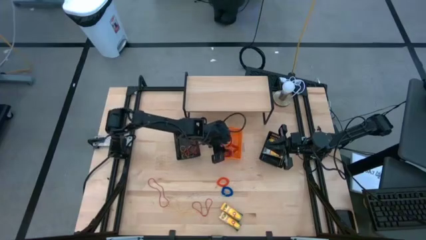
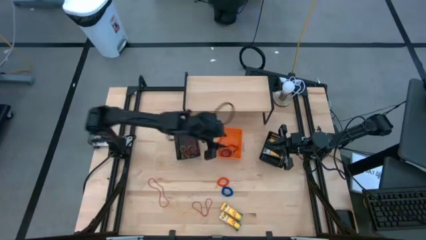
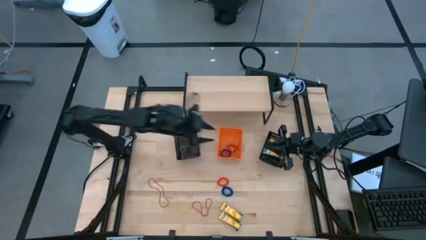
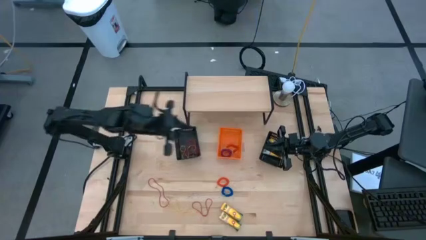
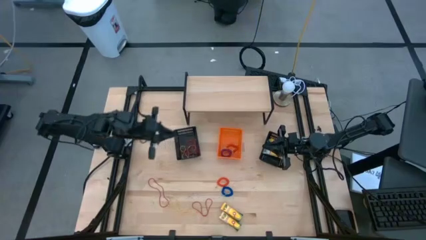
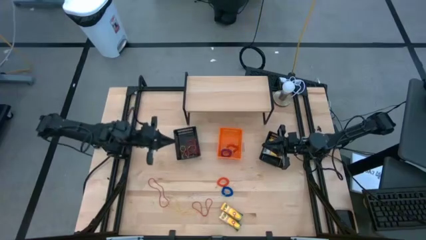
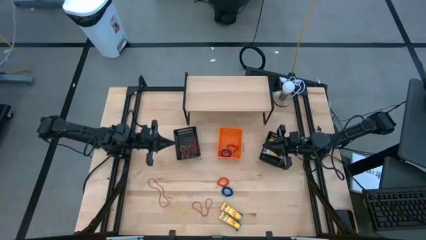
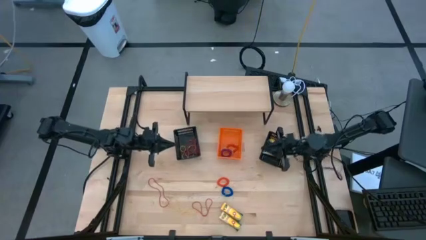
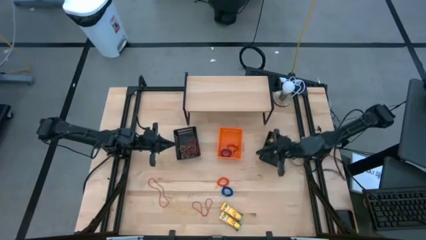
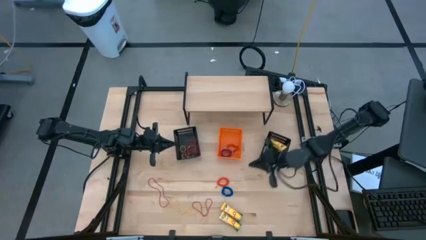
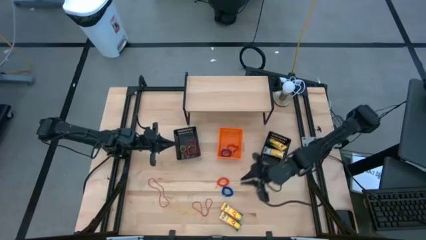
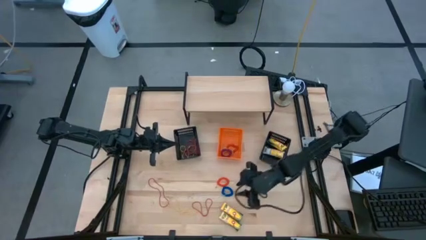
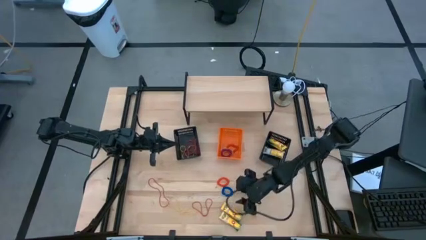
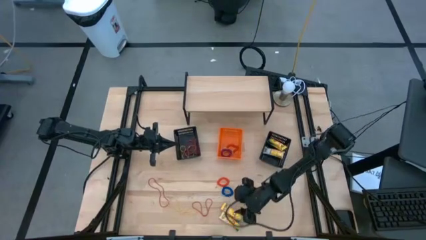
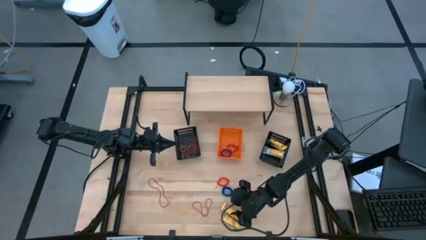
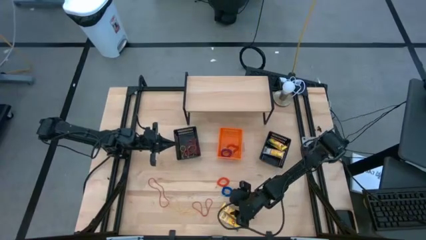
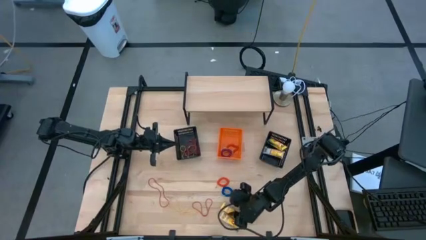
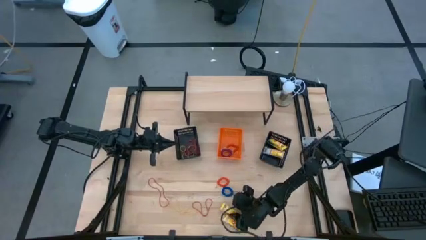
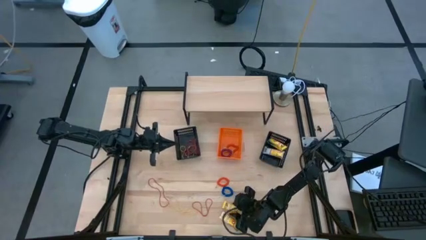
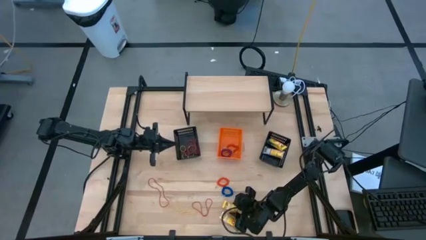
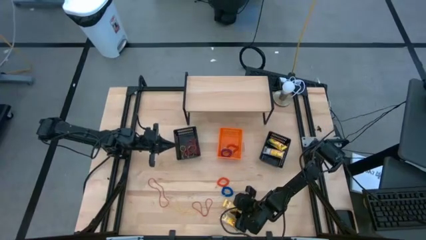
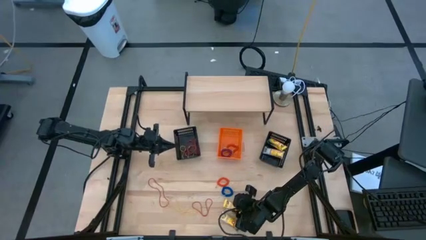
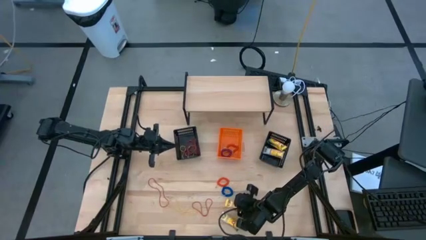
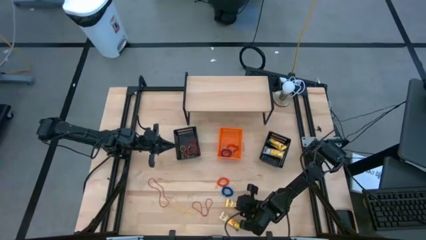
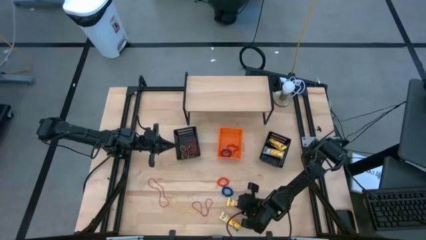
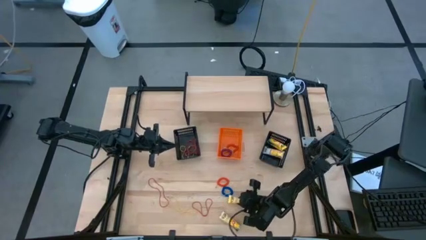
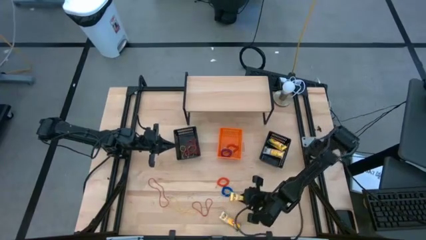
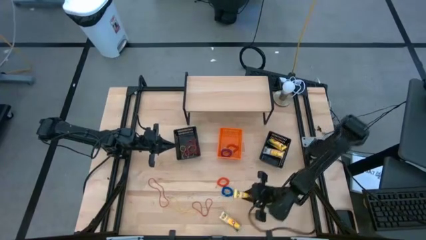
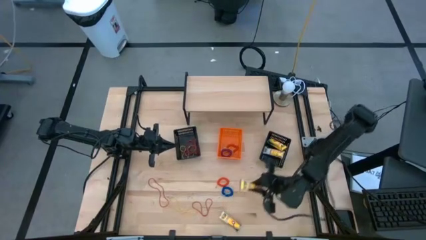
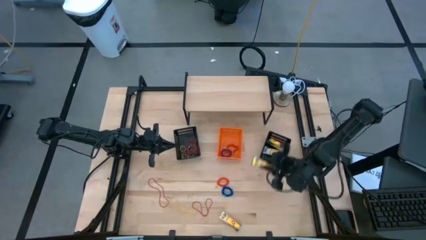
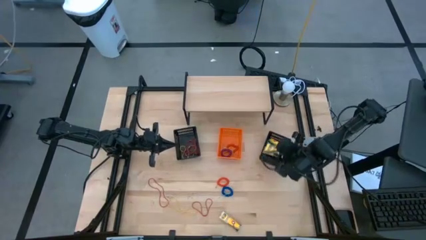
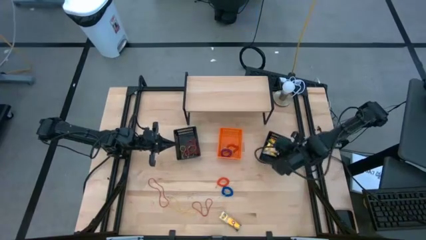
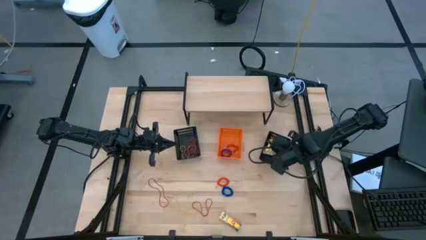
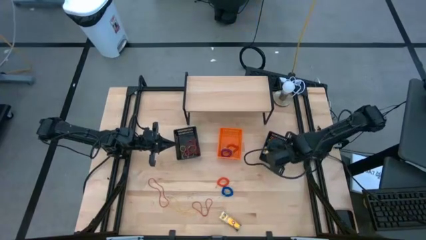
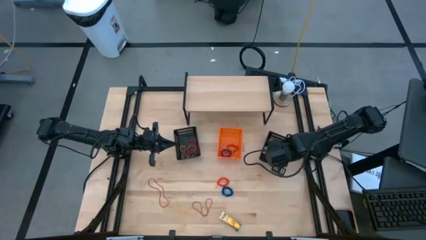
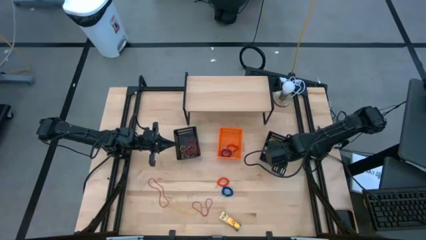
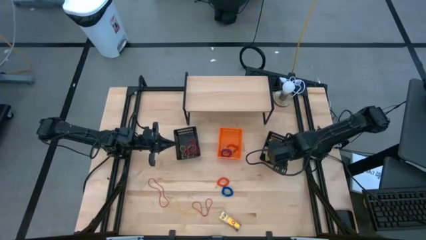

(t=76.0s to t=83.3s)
Task: Pick & Place Office Desk Supplies
Put the yellow crayon box into the right black bin

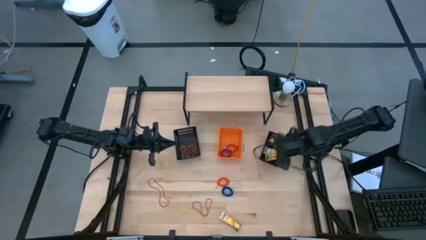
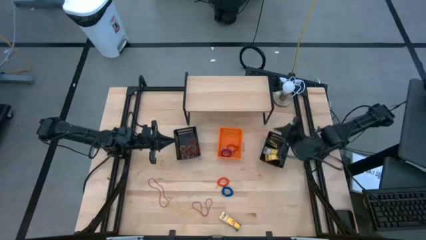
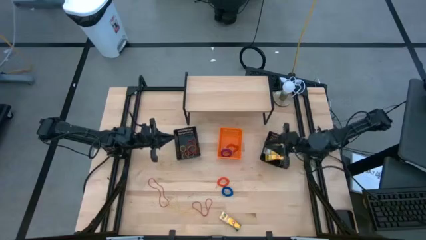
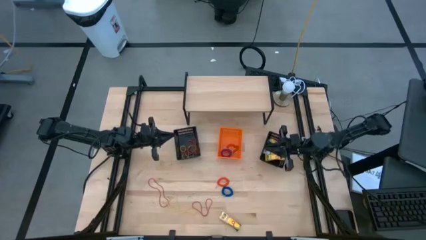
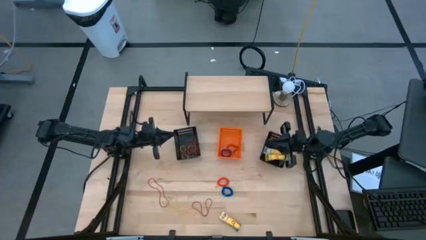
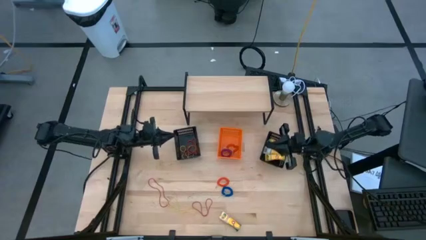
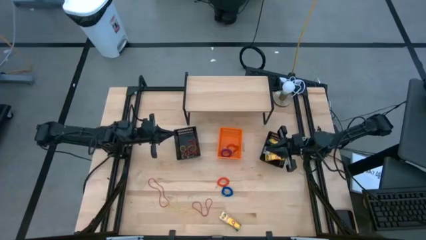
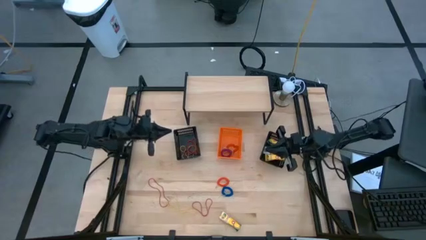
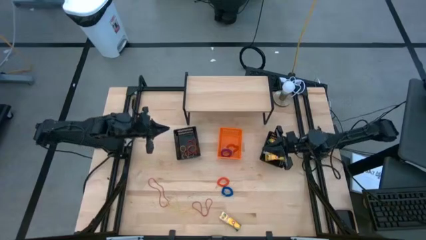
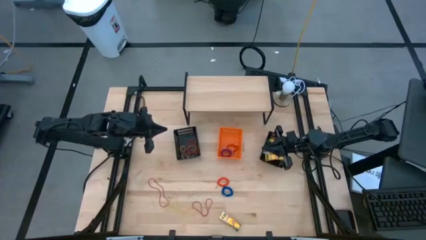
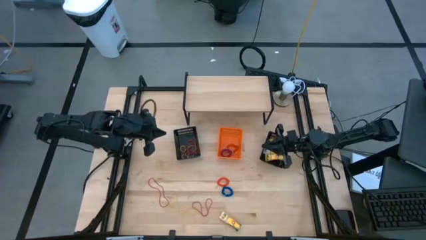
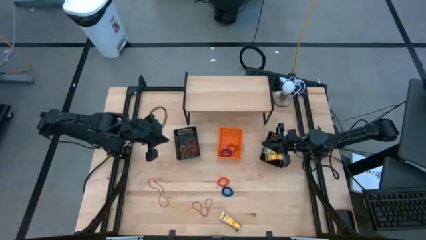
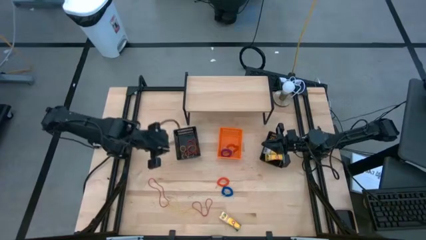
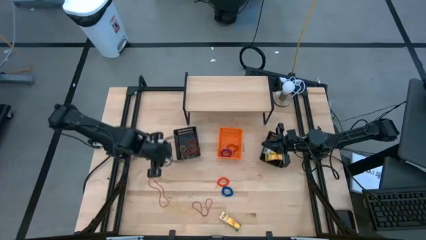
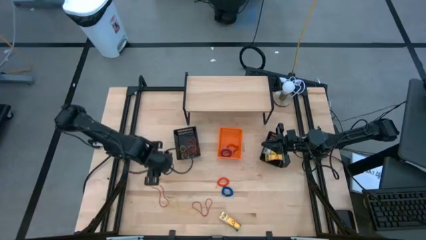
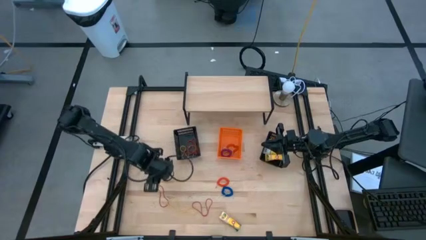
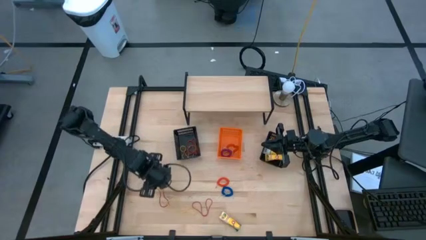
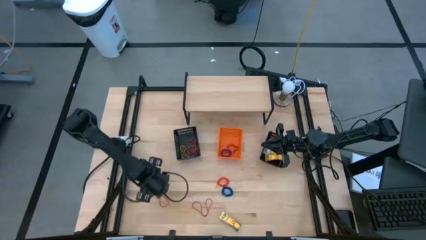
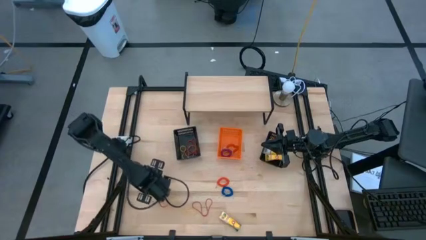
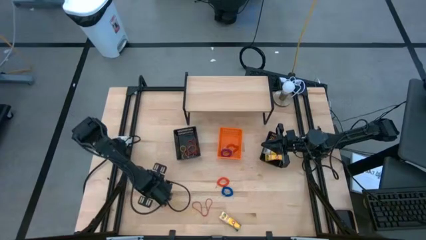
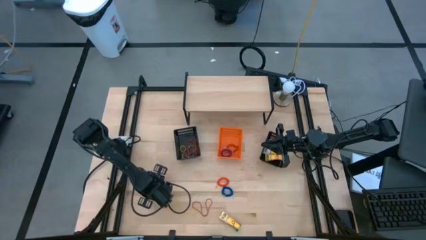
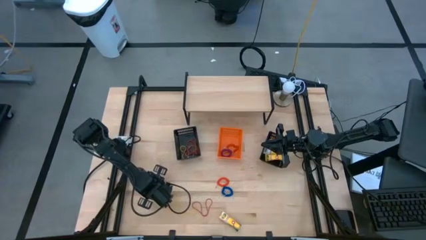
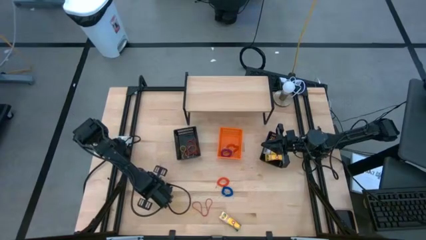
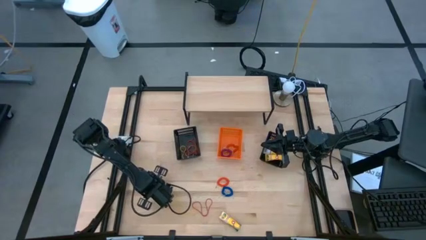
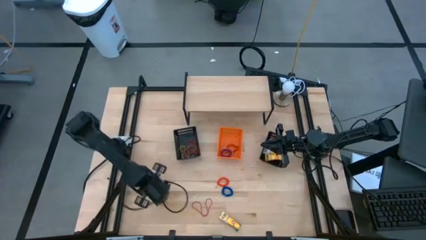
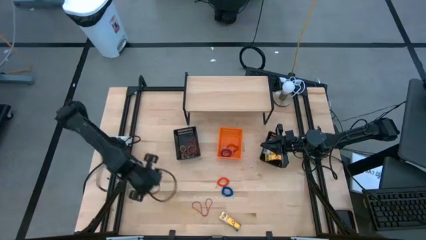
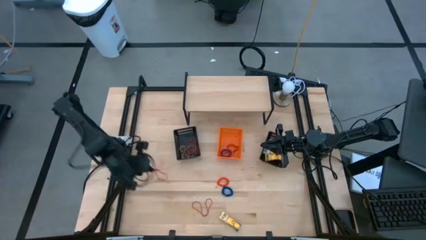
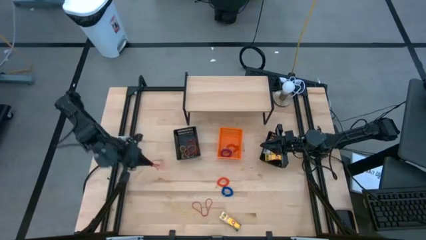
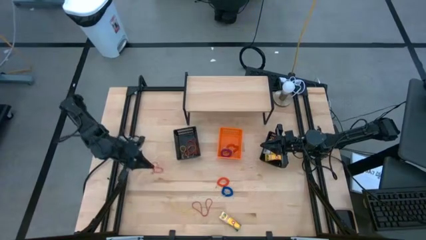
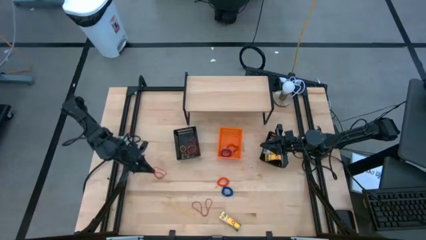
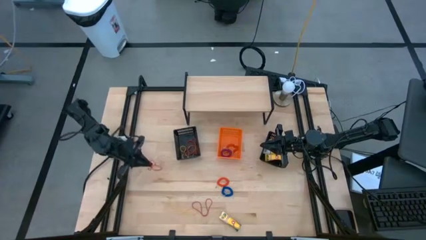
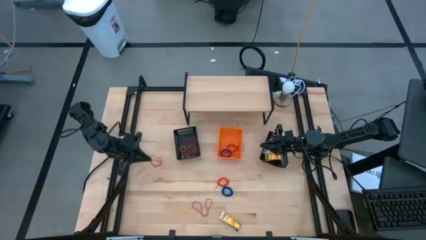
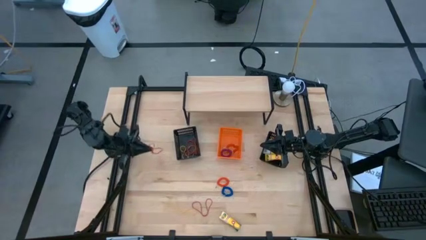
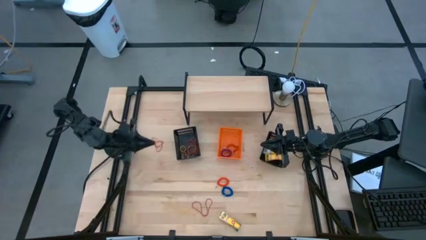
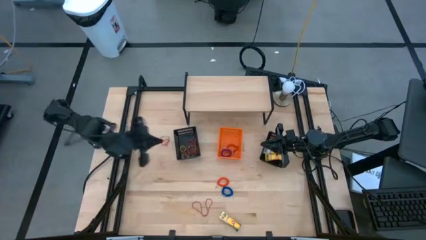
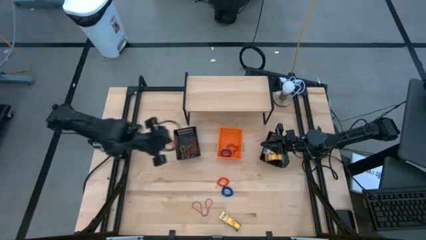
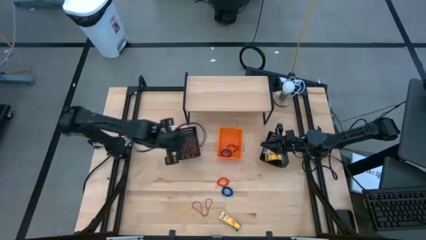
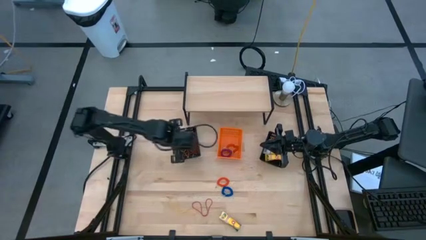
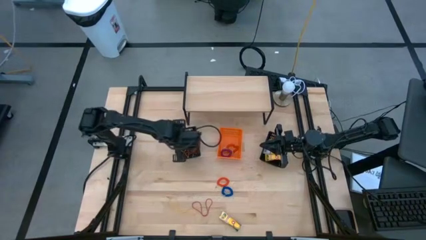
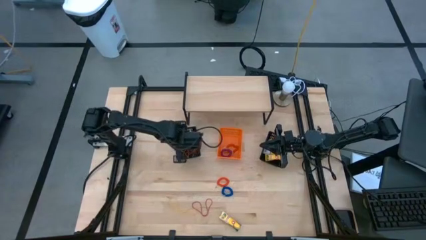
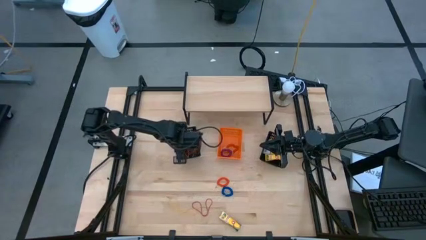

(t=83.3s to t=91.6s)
Put the red rubber band into the left black bin
